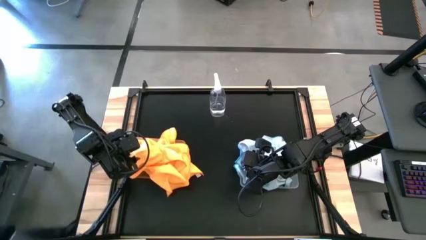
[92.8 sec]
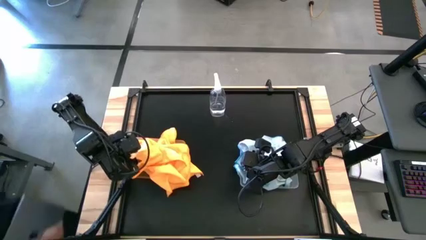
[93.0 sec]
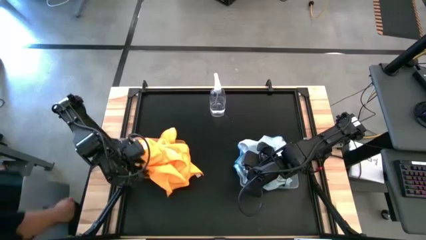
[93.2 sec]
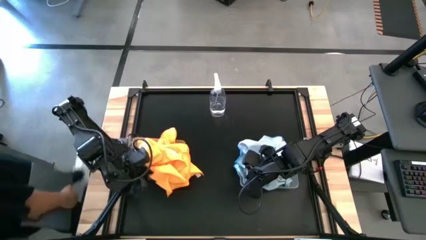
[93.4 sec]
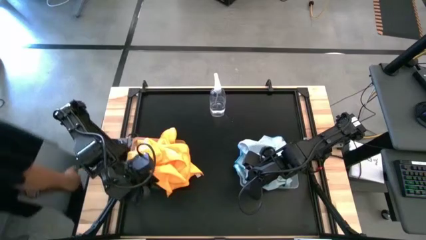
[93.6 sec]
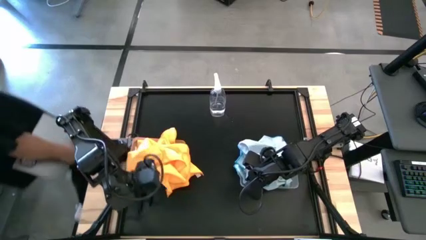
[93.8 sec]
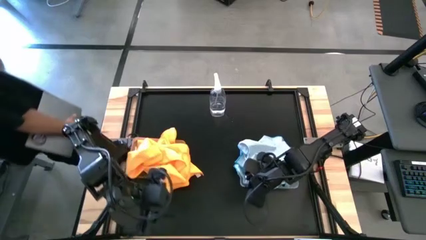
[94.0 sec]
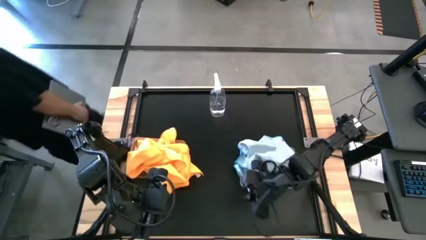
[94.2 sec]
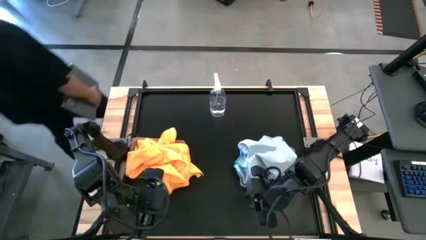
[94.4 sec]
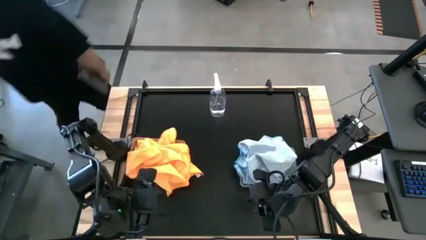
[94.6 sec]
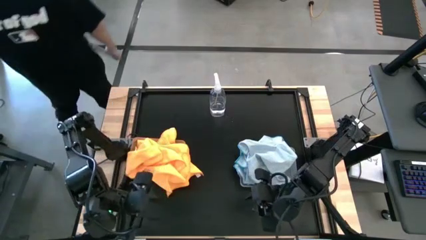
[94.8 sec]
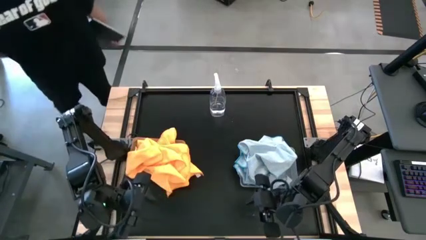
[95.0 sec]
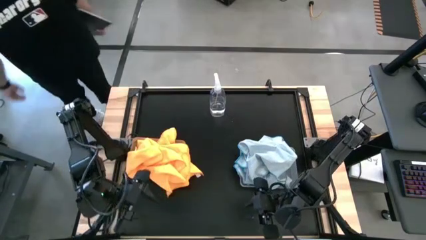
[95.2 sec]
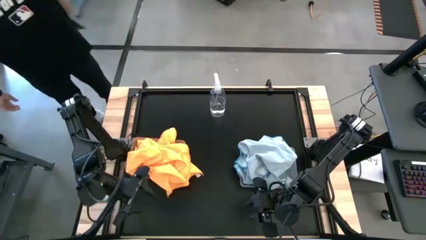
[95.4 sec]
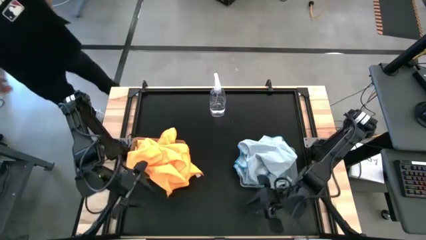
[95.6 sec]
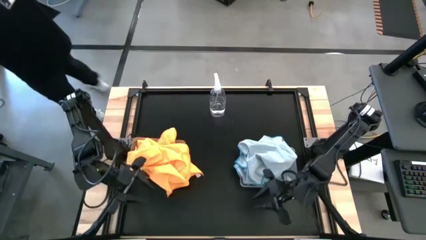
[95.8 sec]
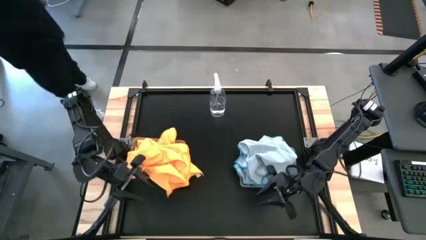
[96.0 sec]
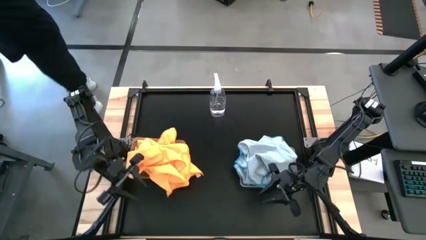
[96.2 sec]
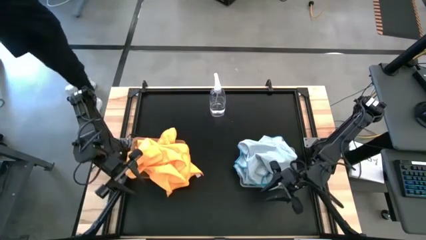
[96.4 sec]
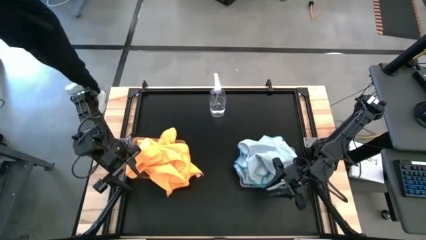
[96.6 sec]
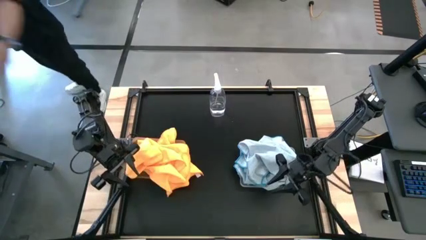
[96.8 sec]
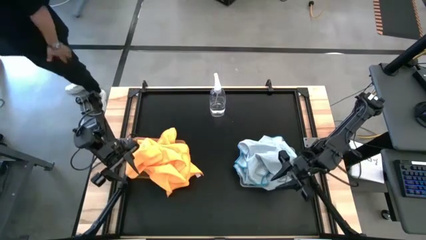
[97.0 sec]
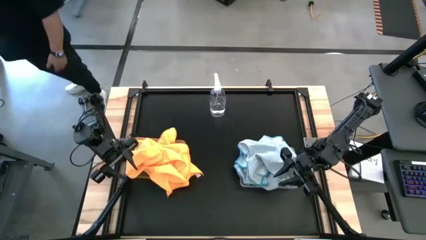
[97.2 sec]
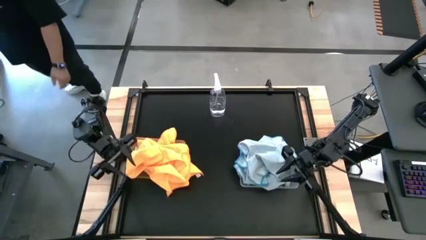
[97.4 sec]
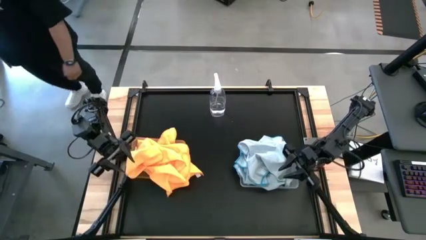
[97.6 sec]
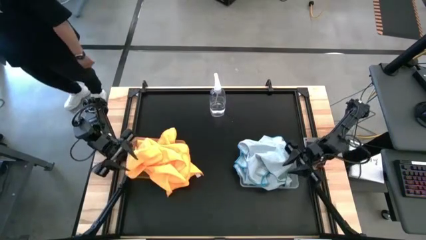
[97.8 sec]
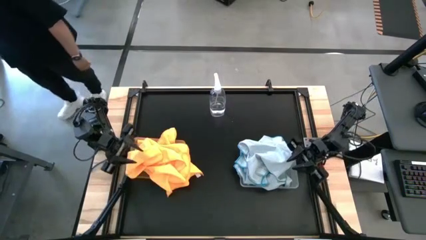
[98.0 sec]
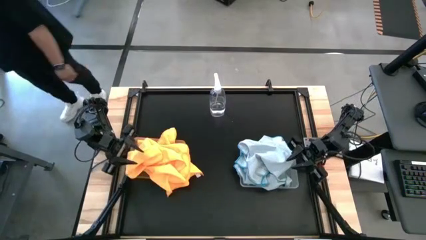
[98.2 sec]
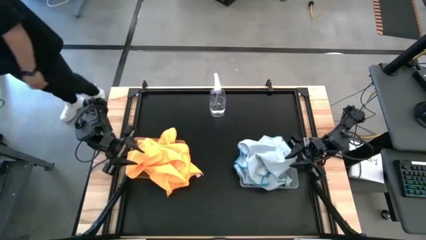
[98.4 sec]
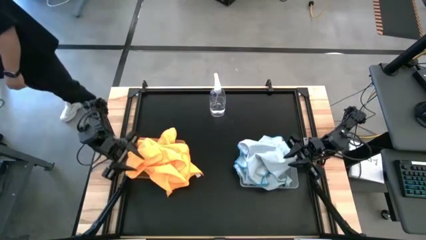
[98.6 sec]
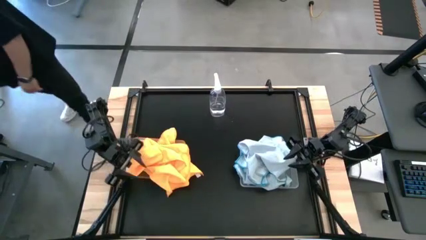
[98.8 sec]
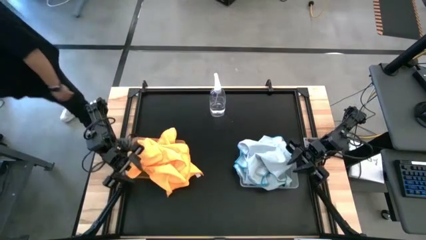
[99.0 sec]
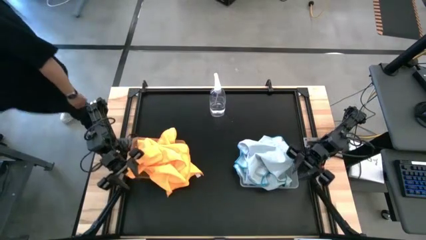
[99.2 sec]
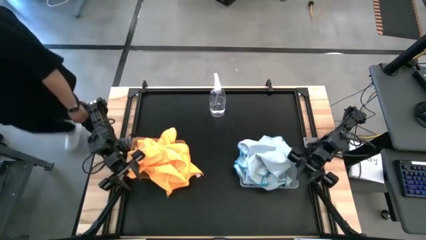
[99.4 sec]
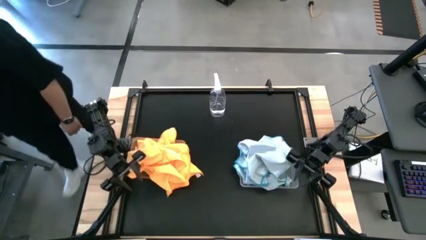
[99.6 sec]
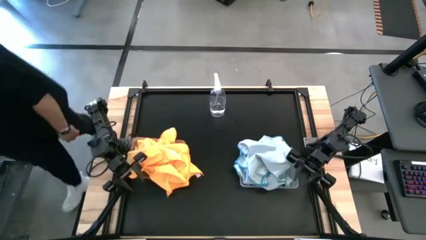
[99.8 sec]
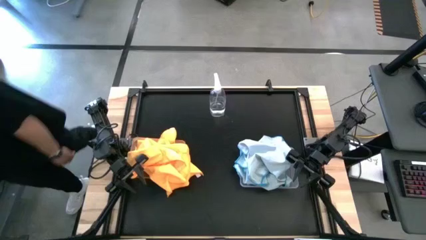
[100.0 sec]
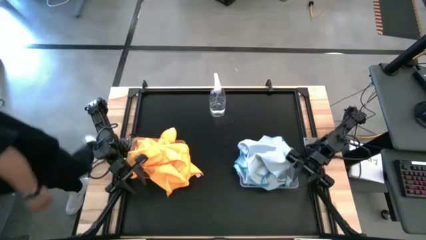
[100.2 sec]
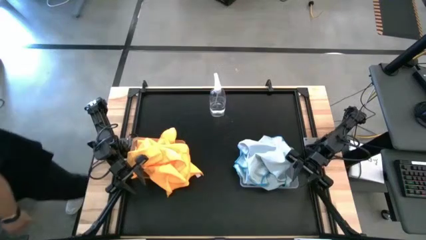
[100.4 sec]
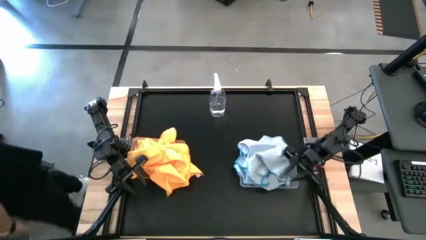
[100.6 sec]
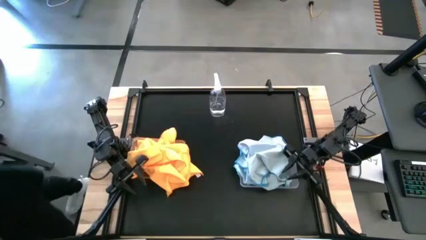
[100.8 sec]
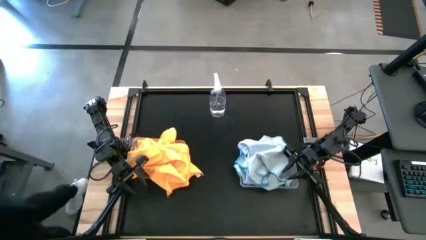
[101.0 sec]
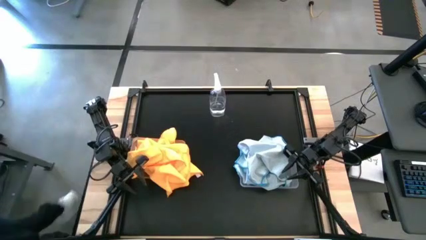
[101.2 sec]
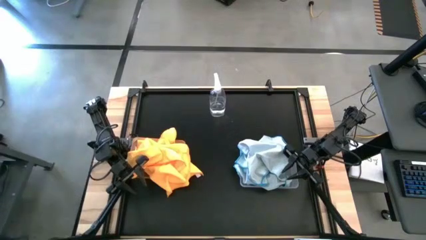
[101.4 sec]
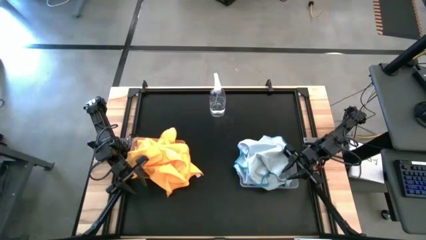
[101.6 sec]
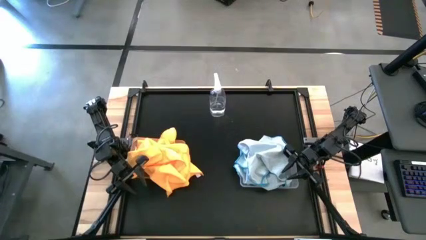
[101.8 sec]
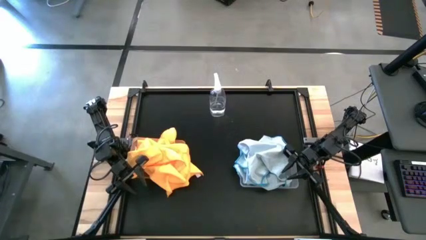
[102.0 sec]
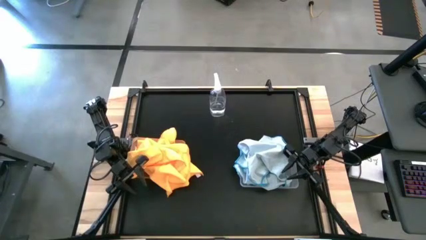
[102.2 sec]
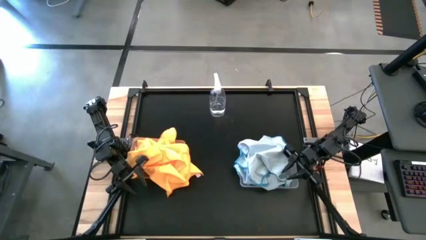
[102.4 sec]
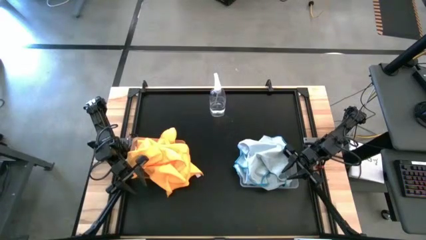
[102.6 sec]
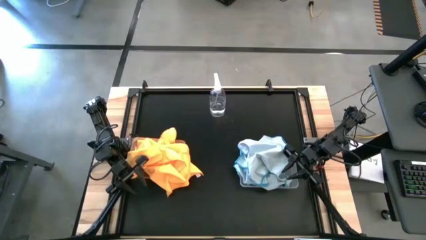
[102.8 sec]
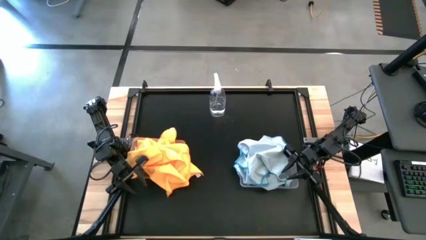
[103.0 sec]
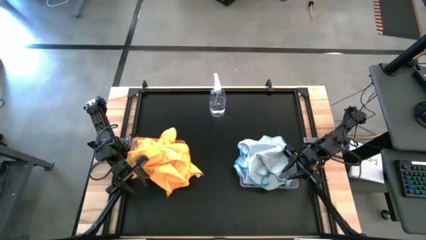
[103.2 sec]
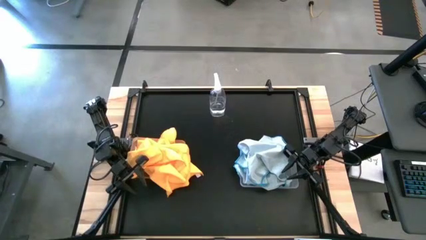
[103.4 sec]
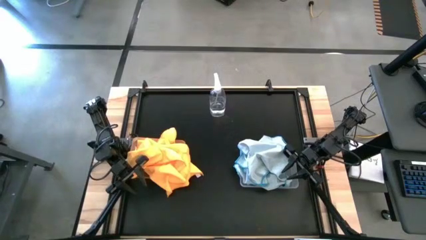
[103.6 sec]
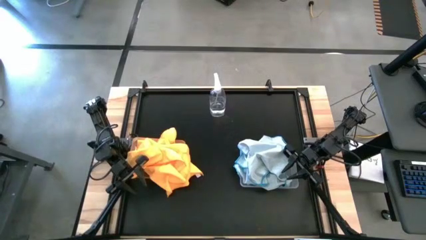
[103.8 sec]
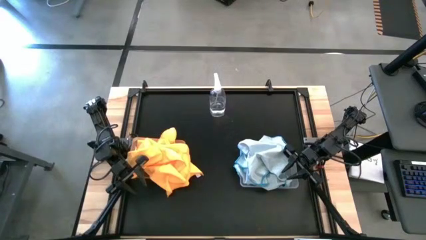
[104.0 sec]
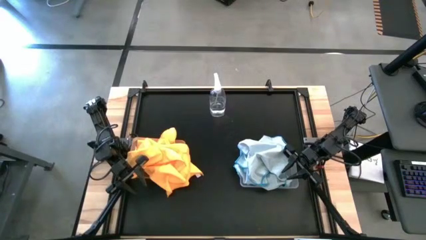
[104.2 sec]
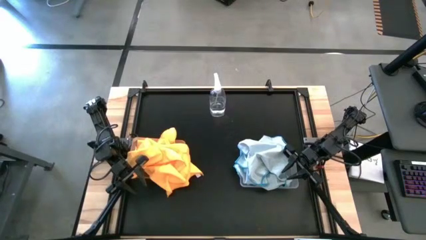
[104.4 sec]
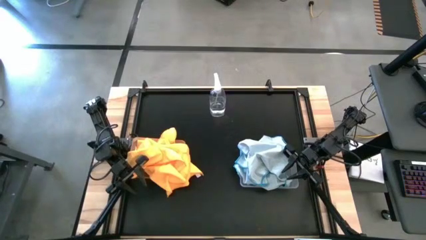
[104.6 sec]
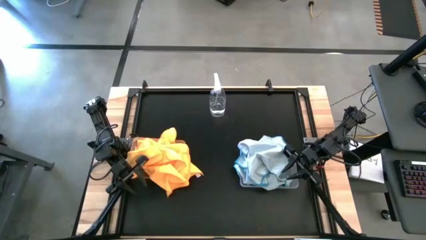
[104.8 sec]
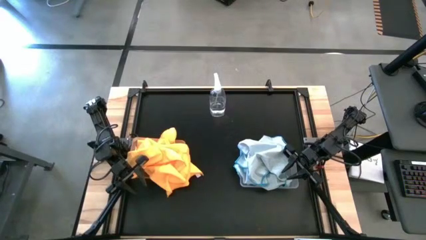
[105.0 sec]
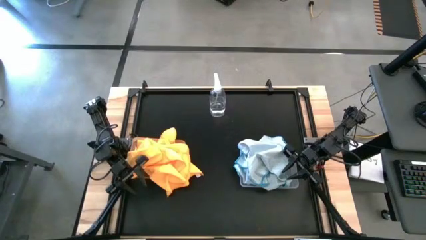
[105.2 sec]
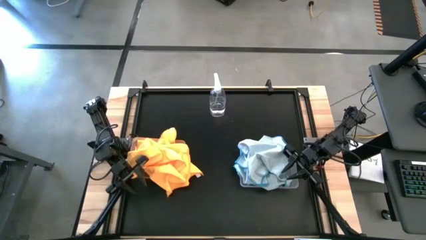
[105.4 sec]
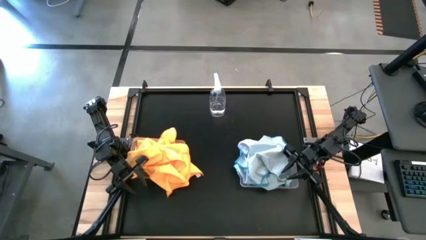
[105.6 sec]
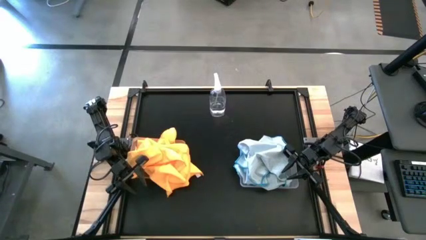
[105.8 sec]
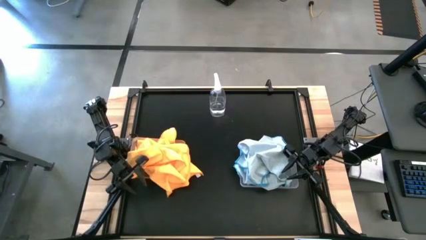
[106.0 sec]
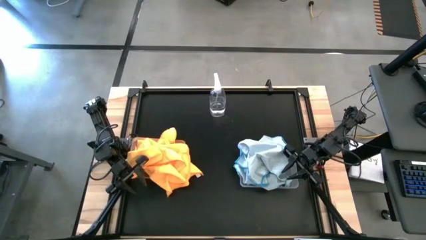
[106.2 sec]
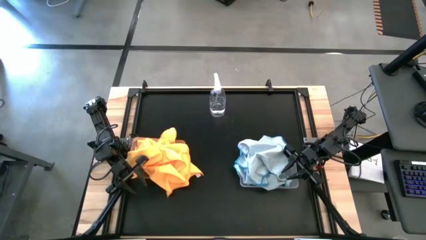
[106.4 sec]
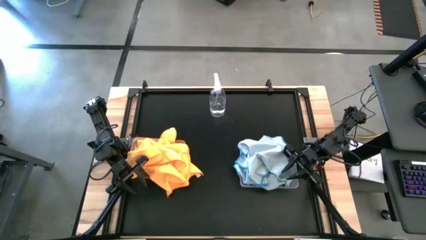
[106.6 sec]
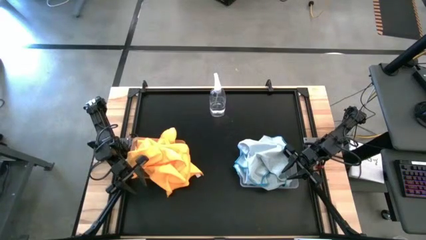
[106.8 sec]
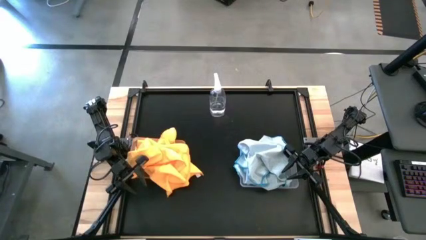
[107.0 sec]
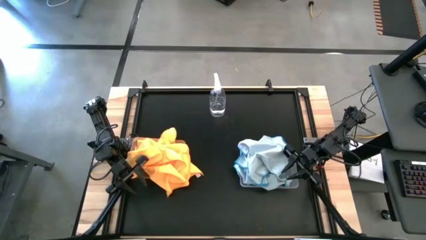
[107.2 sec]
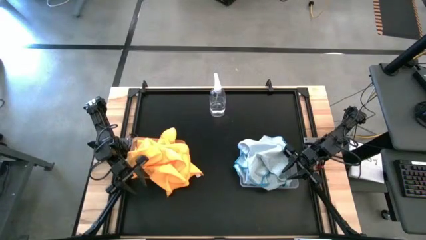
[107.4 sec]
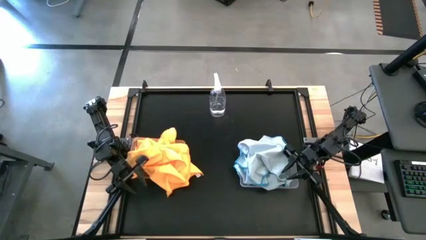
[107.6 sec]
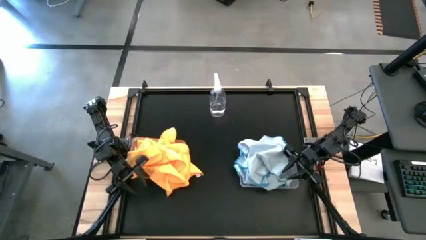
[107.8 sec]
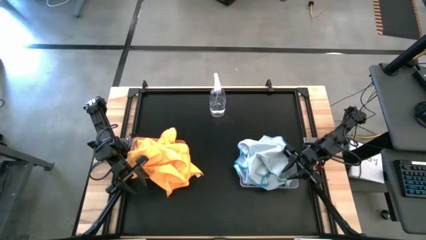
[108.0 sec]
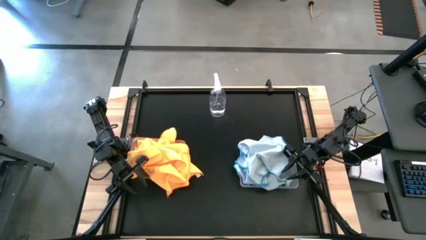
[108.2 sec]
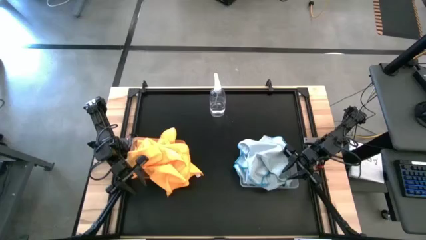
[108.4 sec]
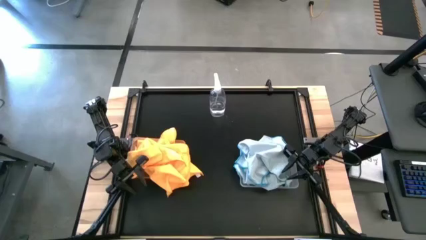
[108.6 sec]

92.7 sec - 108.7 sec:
Task: Sort microfiber towel by color & place in baskets
Return to Home Position
